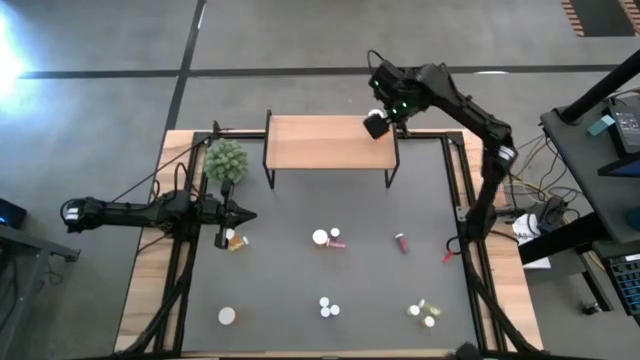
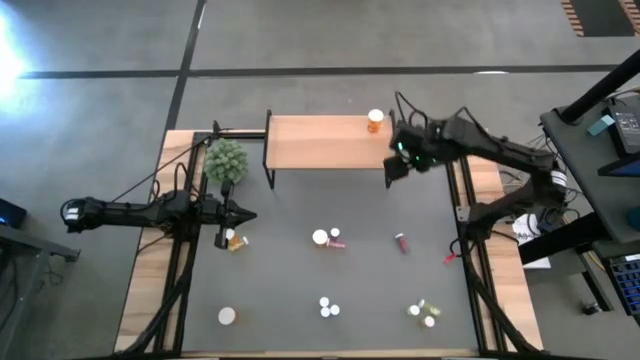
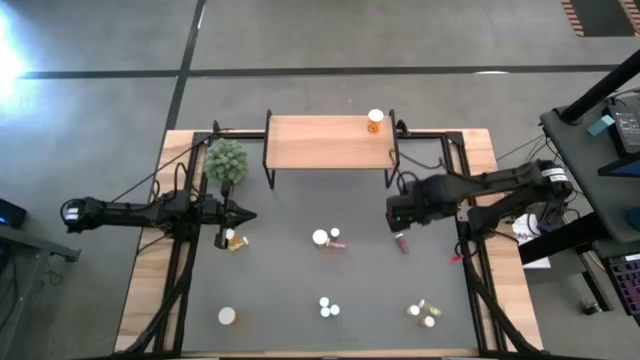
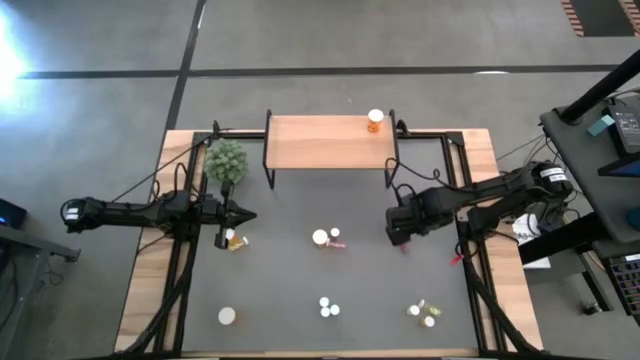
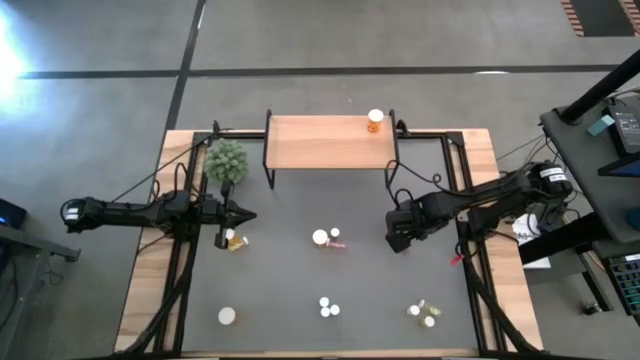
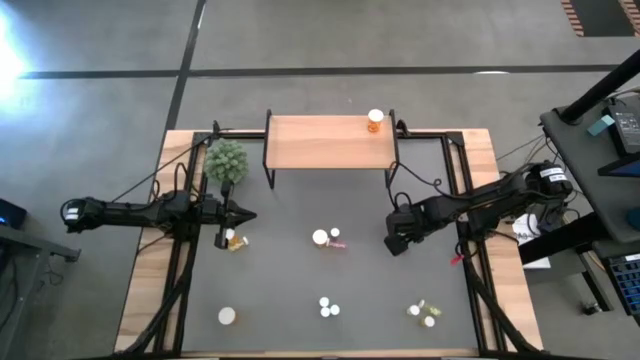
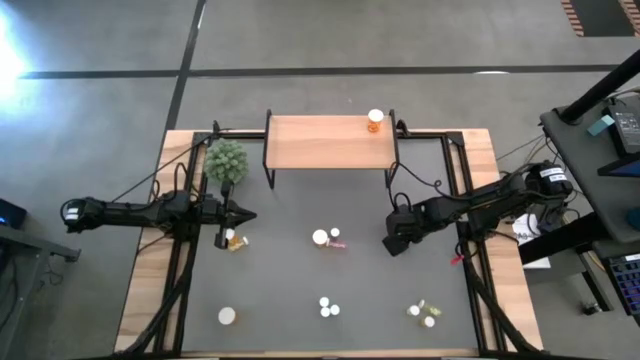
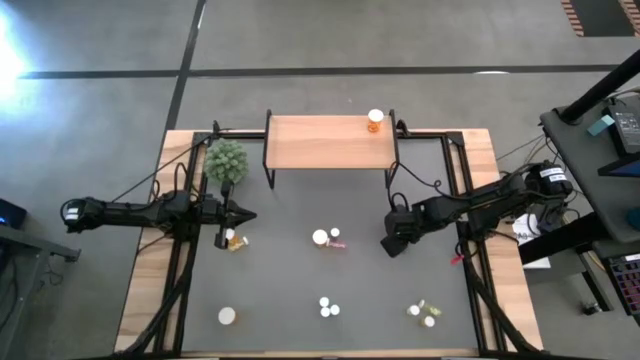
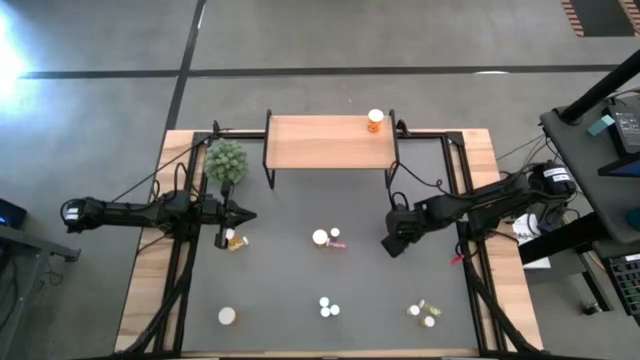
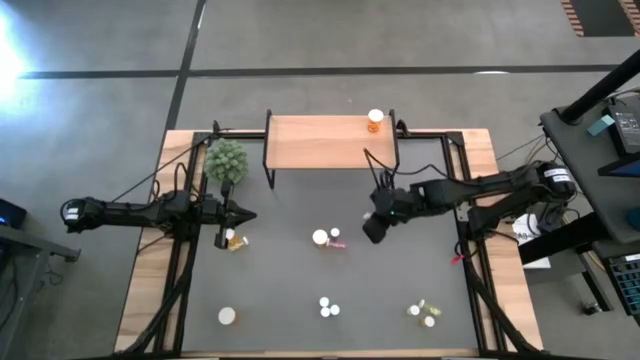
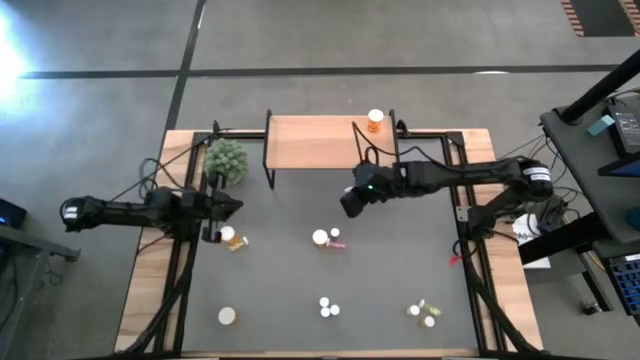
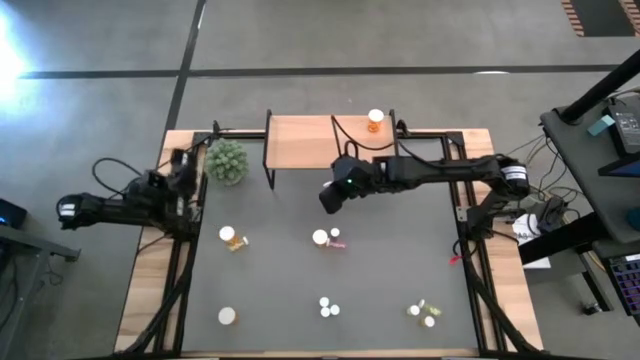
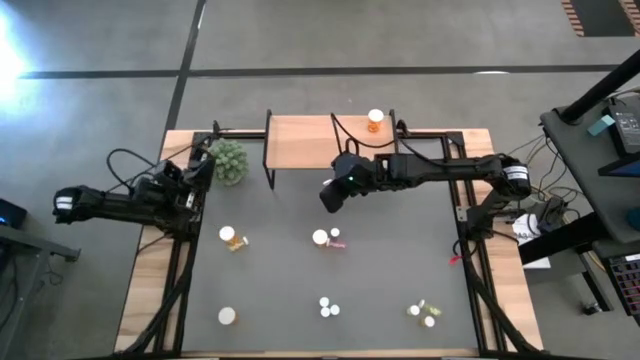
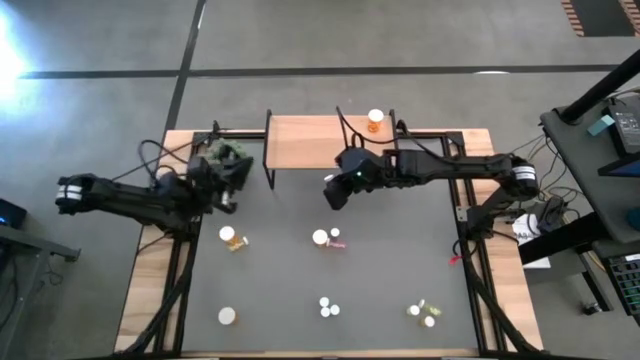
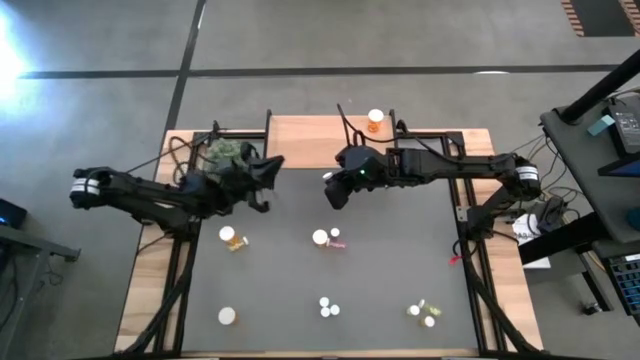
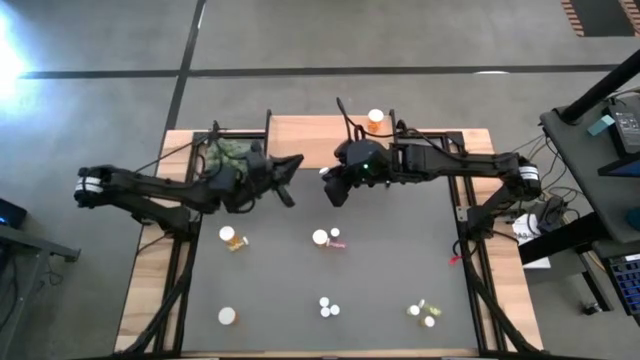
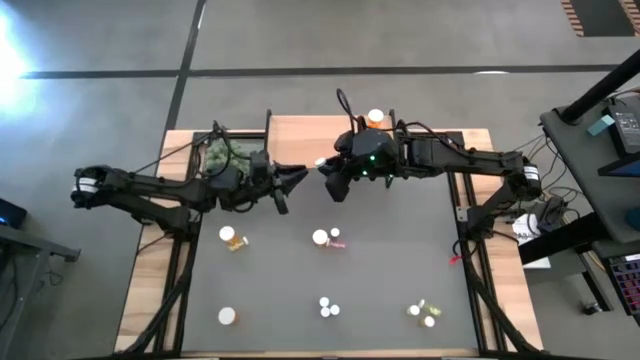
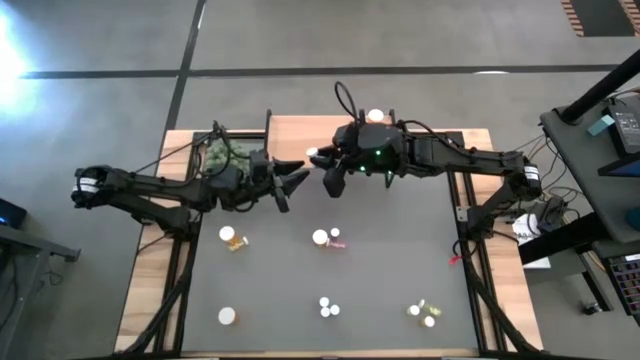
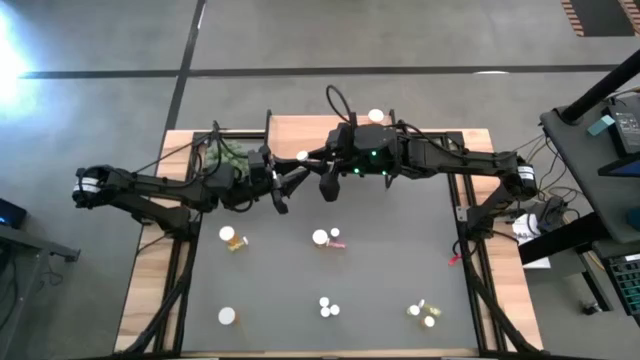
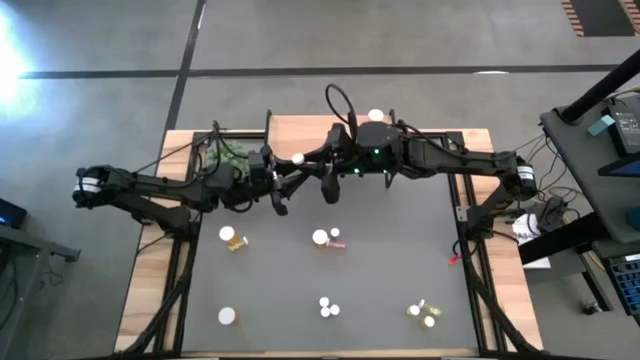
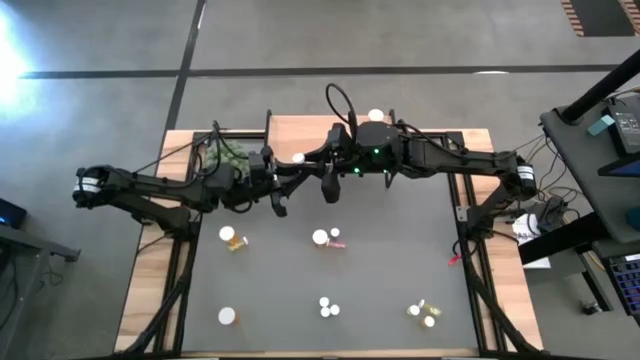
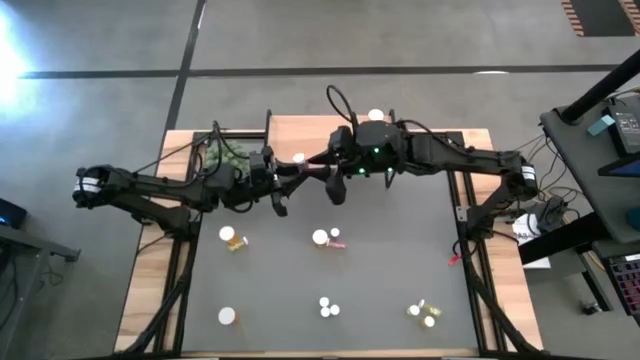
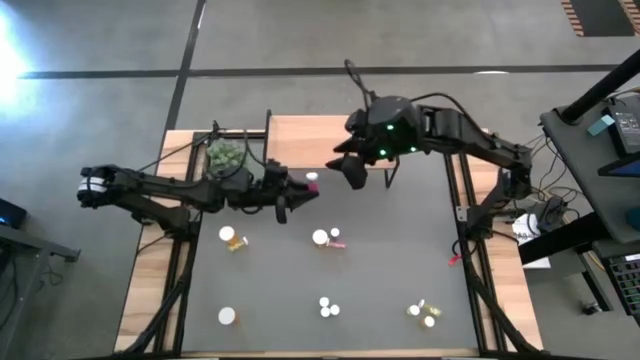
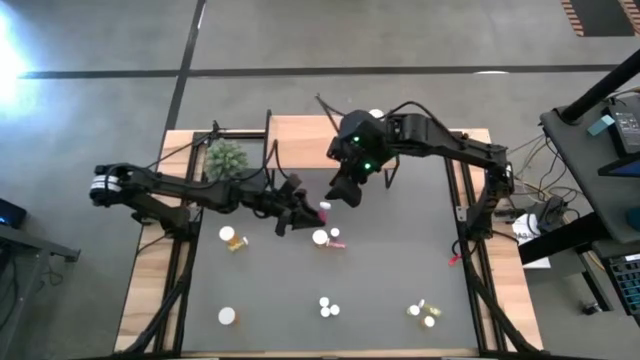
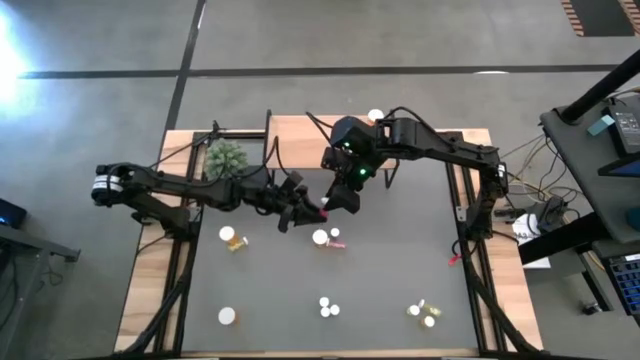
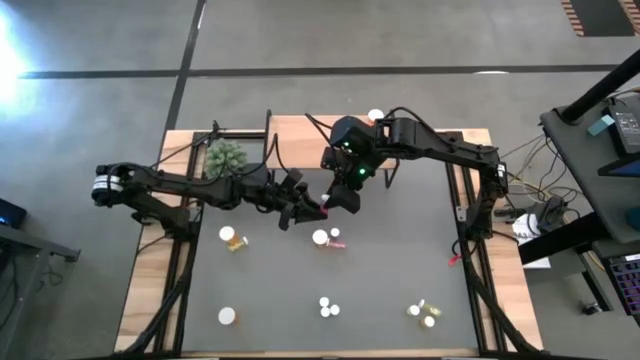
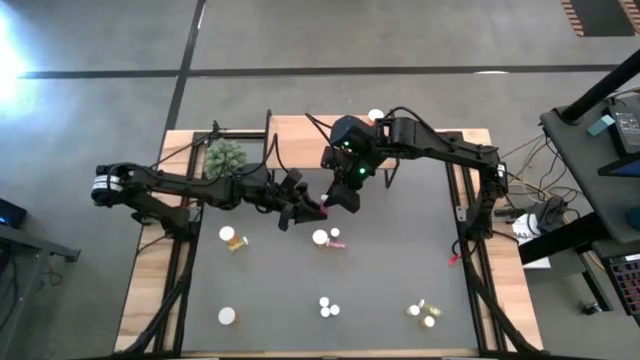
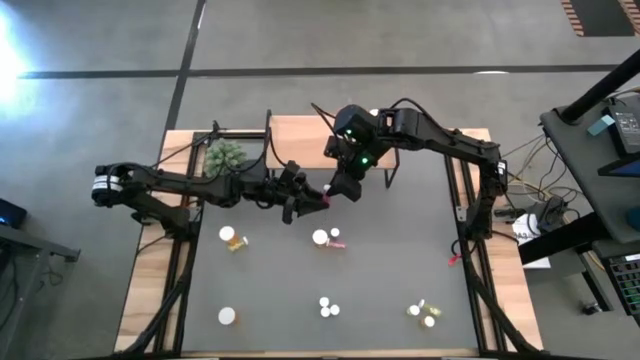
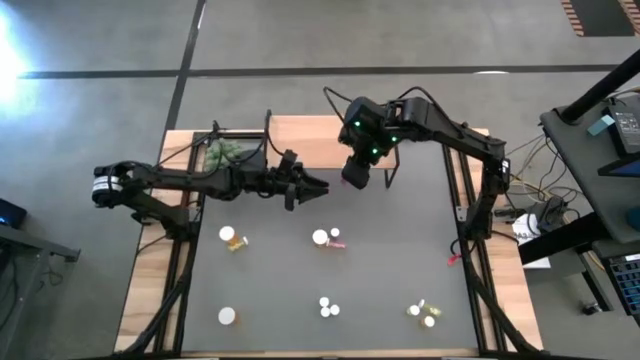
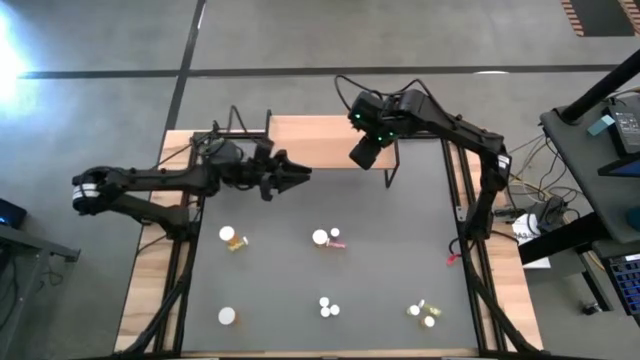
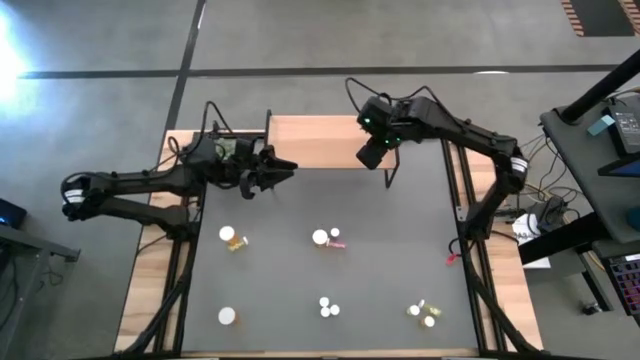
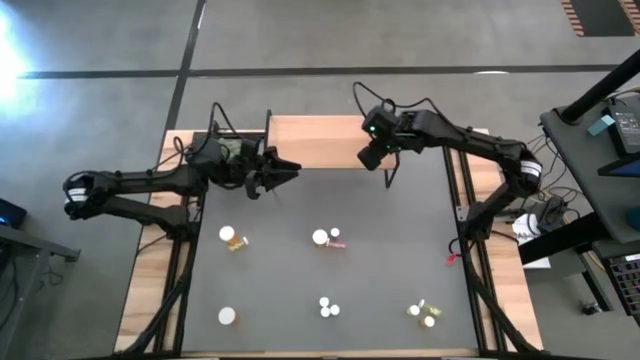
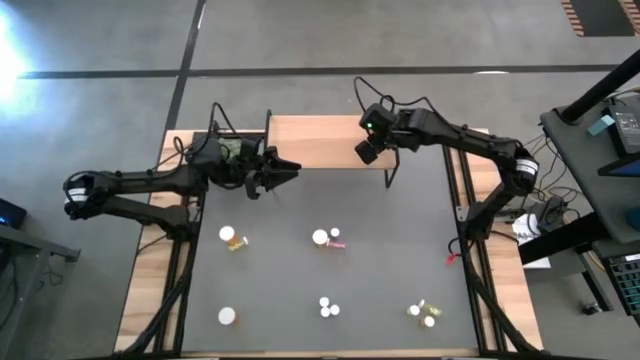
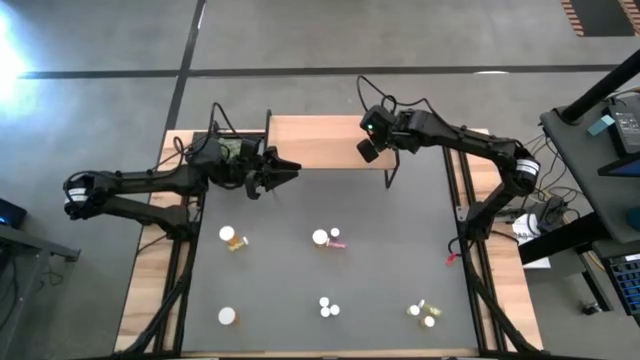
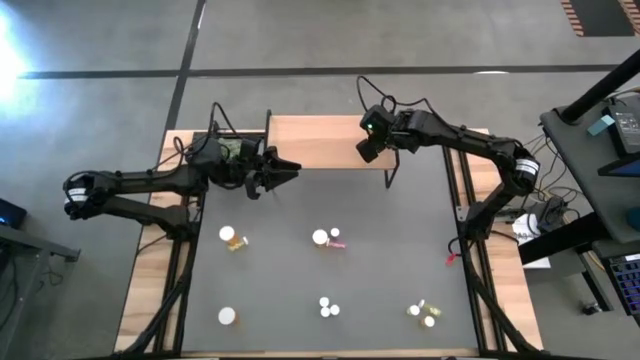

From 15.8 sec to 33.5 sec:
Task: Pick and place medicine bottles onto shelf by color
Put the small blue pill bottle on the shelf

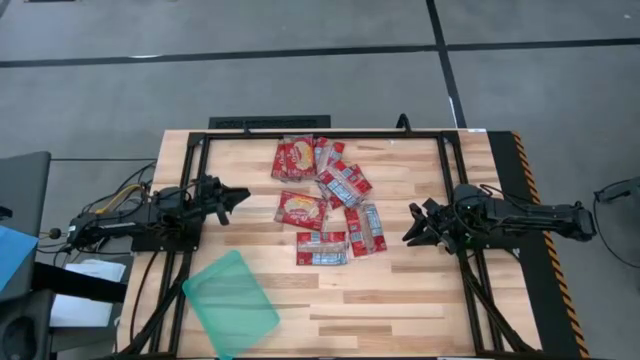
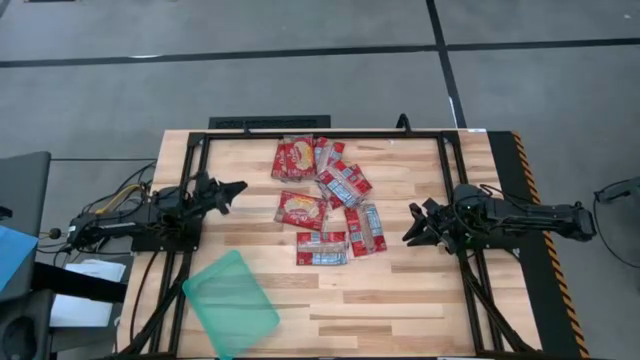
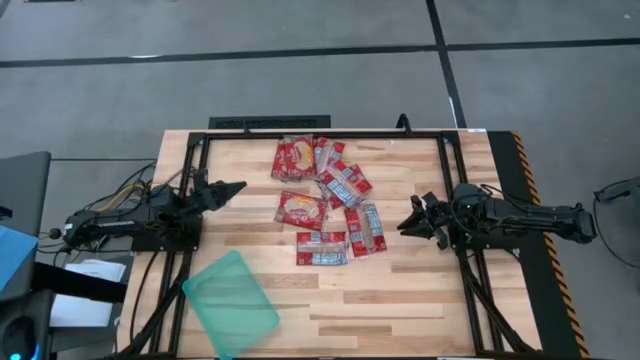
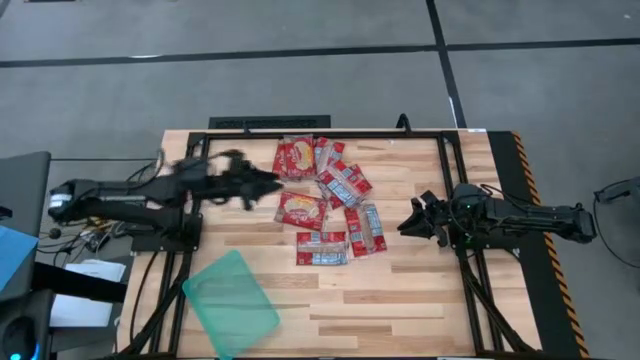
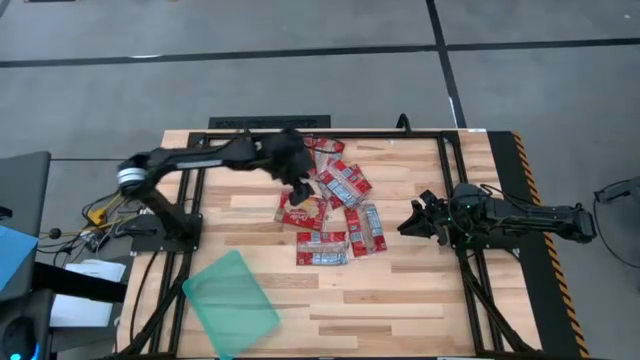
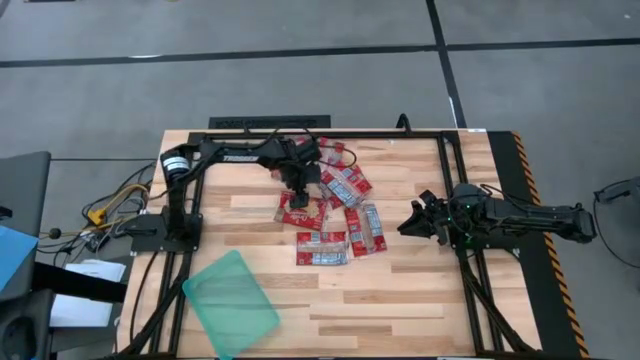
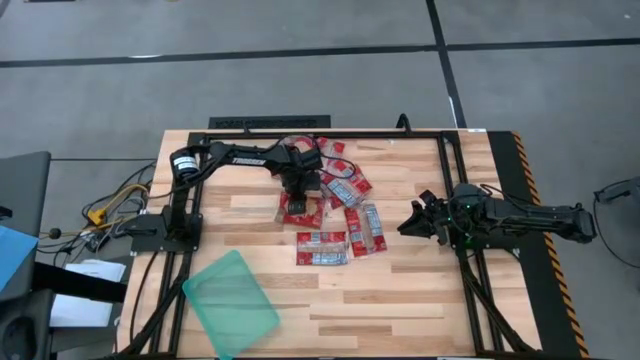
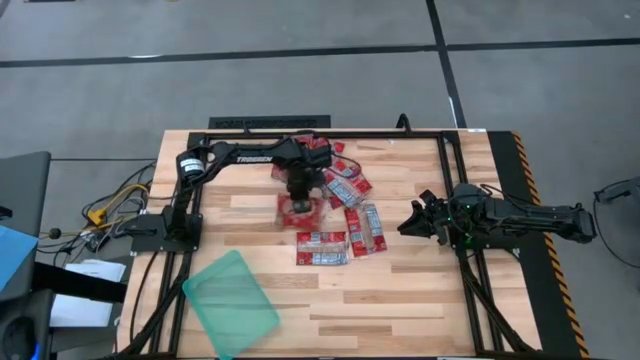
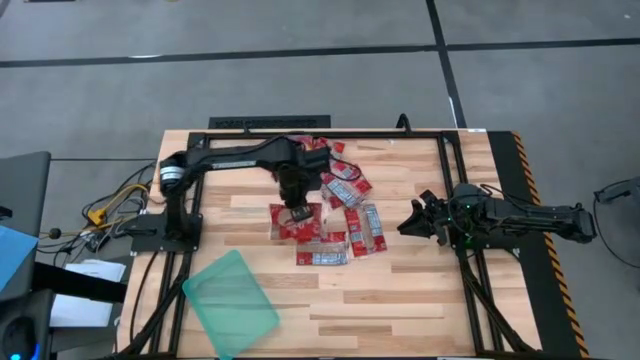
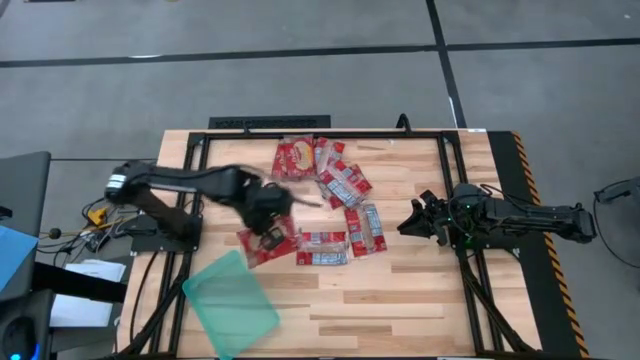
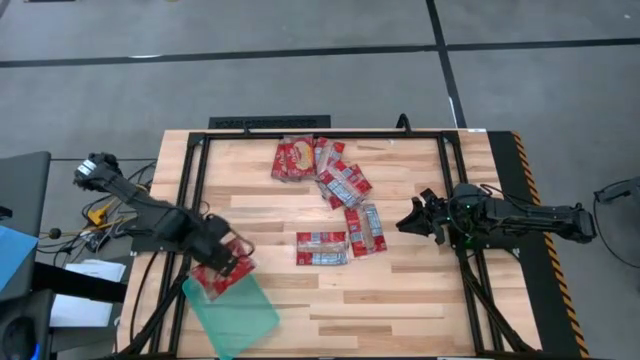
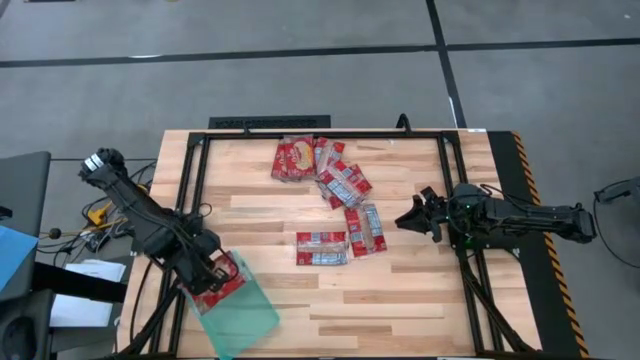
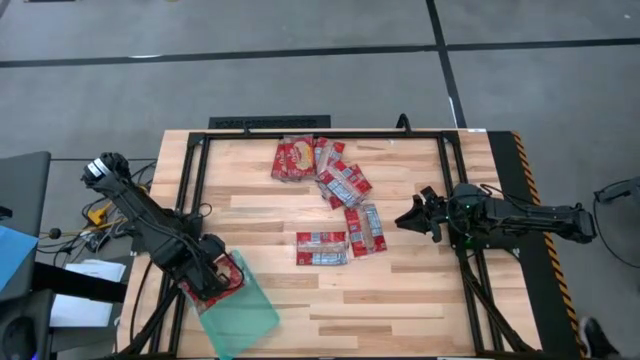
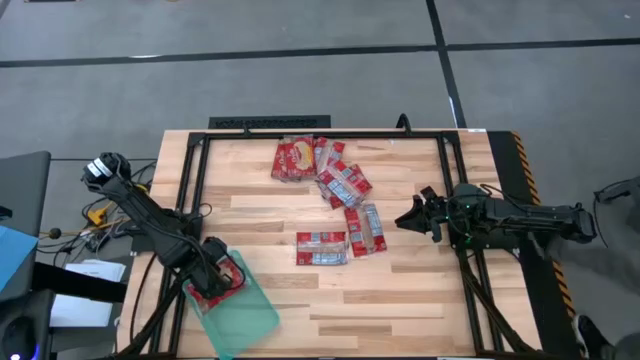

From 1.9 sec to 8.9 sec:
Task: Sort popcorn bags into baskets
Put the red popcorn bag into the green bin
